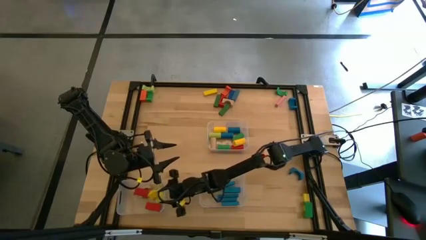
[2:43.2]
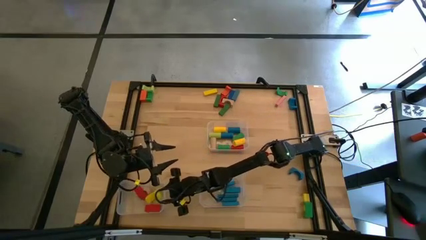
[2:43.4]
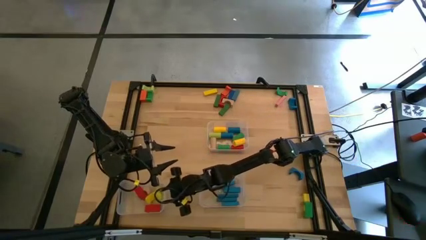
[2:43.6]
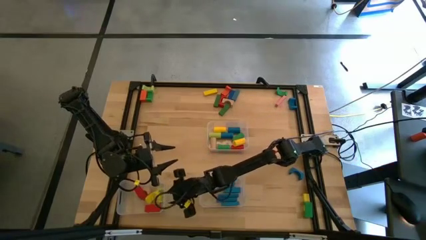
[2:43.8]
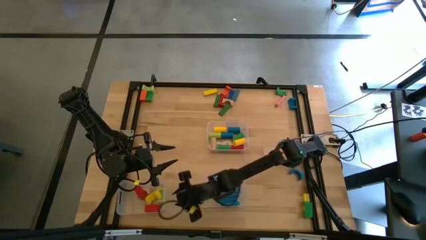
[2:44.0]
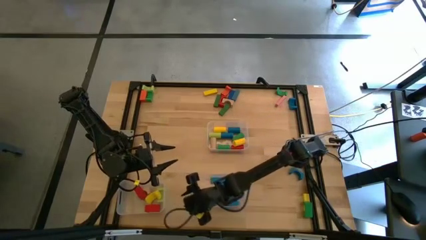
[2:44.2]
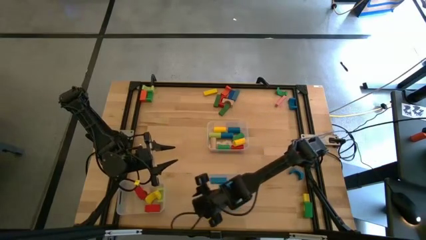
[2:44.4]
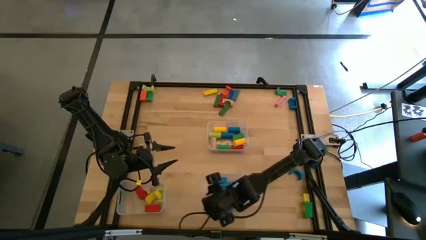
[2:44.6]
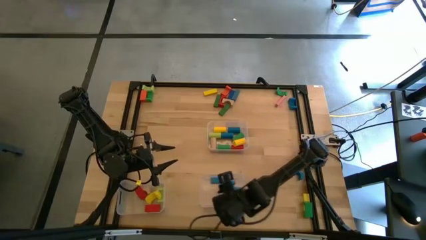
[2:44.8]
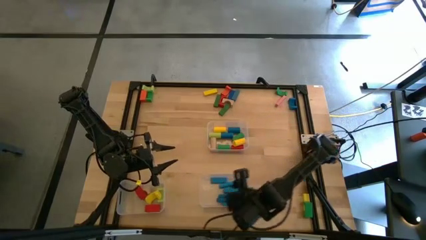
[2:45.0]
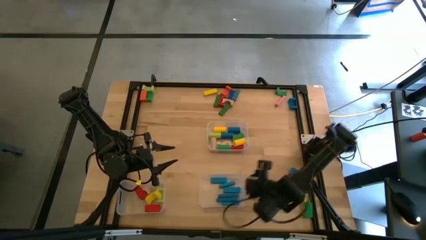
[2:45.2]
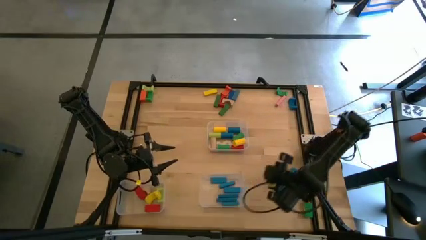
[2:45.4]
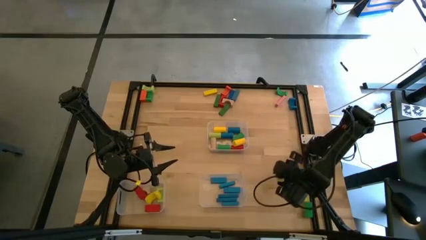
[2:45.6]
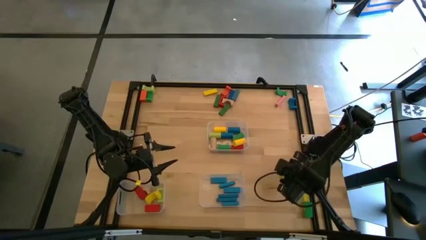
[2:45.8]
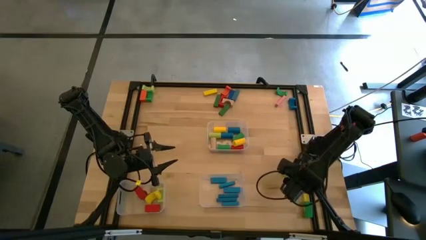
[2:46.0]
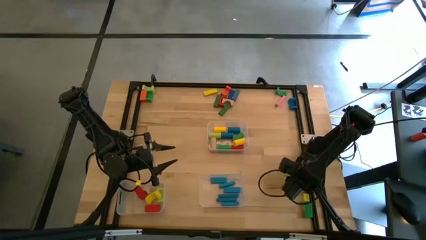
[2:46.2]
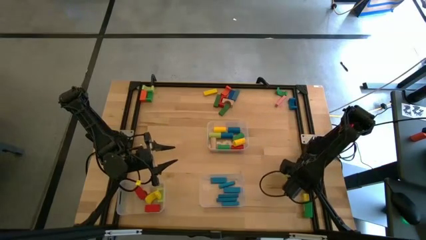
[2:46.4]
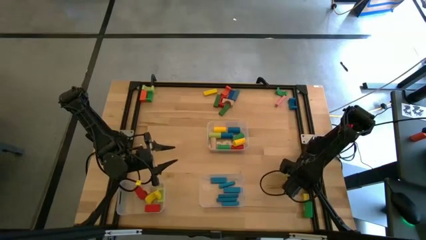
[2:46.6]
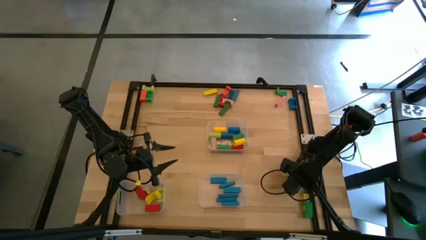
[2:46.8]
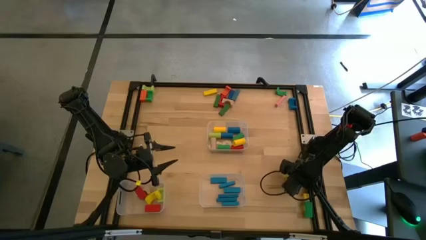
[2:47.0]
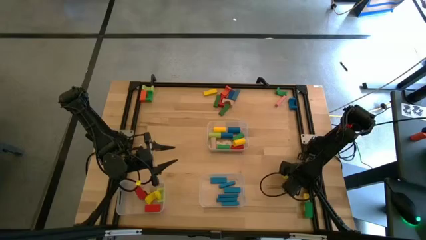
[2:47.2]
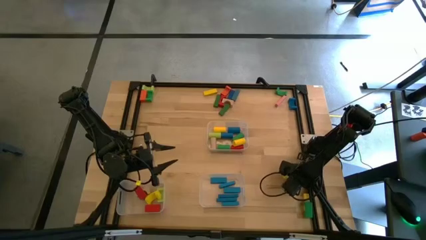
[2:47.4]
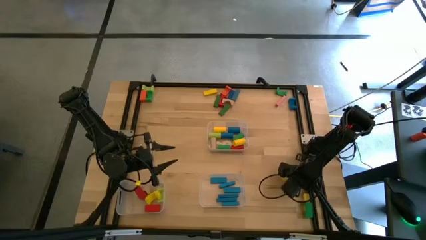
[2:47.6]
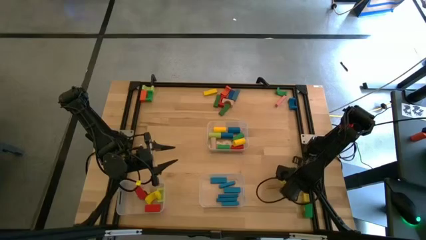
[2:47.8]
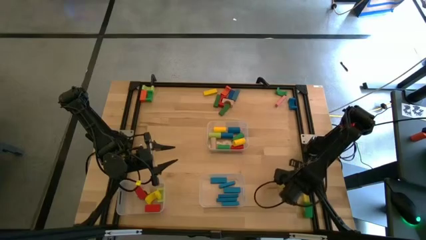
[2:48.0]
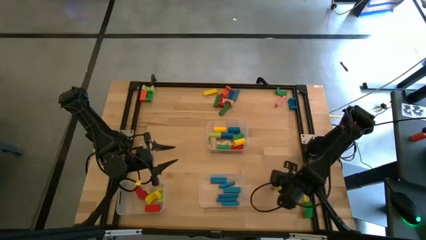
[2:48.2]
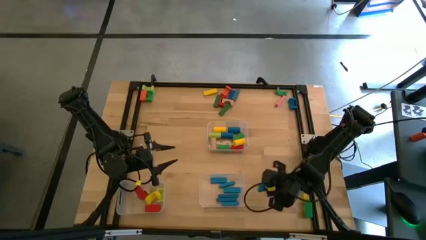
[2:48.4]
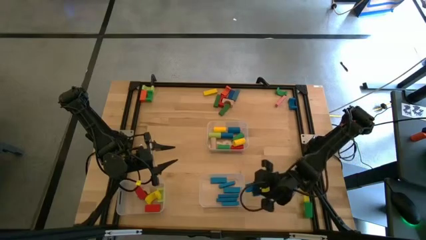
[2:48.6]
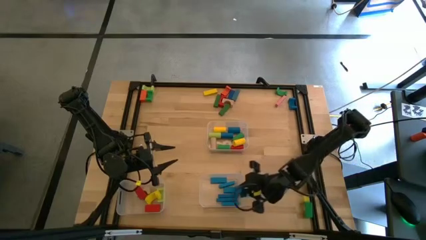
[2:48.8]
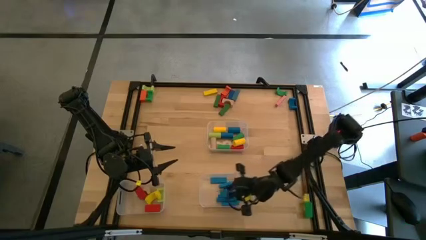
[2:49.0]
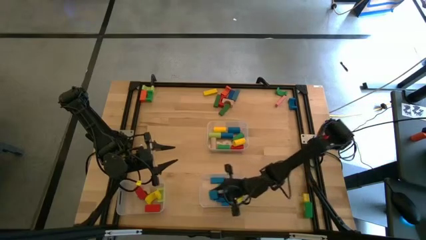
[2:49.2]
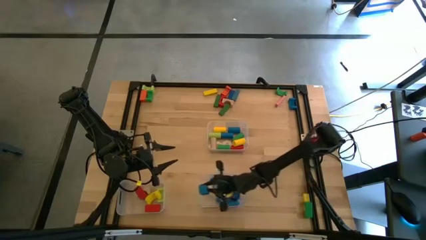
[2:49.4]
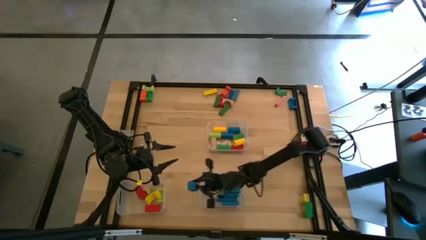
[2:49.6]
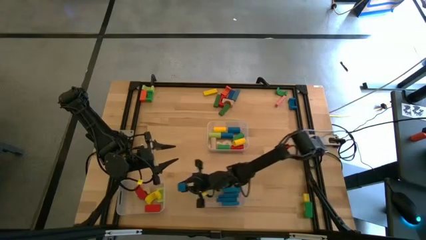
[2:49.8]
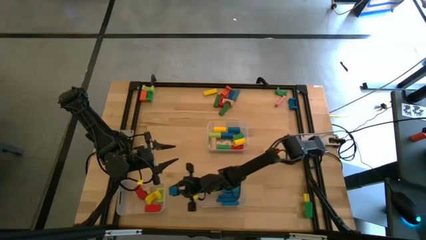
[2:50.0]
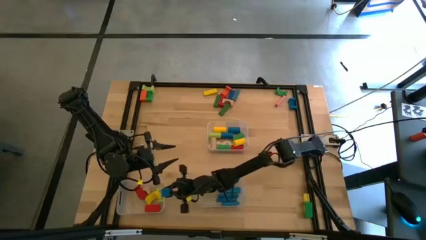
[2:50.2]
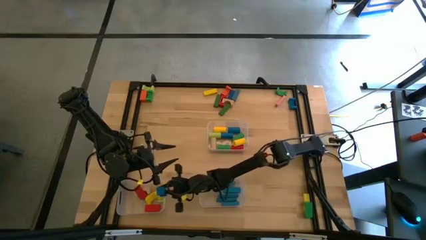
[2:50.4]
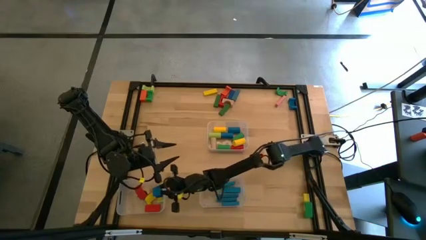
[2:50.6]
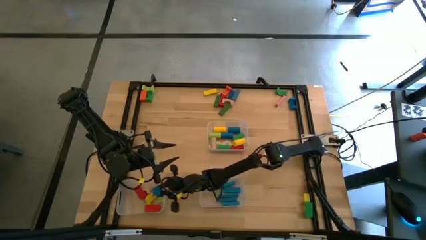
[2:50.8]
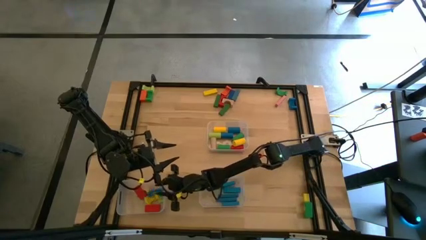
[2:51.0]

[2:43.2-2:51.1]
Task: Sort blocks by size
Put the blue arch block into the bottom left transparent bin

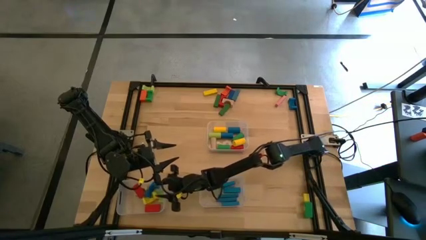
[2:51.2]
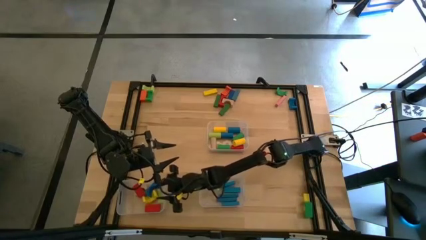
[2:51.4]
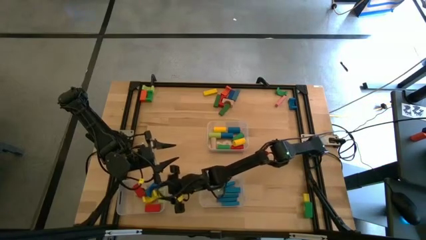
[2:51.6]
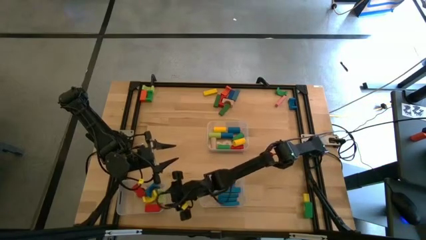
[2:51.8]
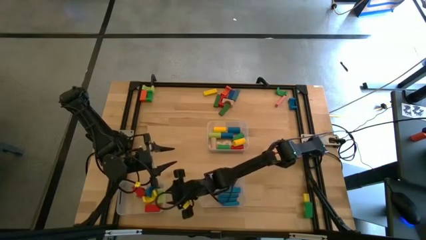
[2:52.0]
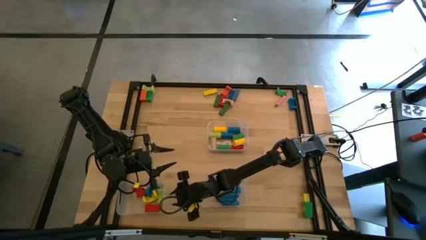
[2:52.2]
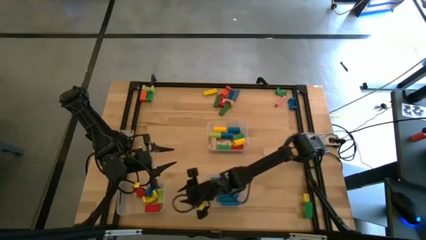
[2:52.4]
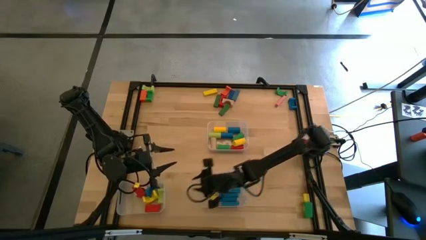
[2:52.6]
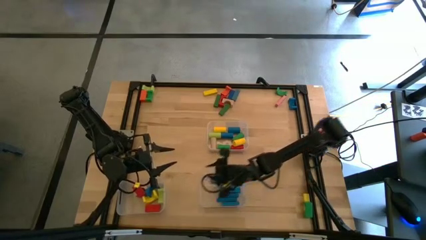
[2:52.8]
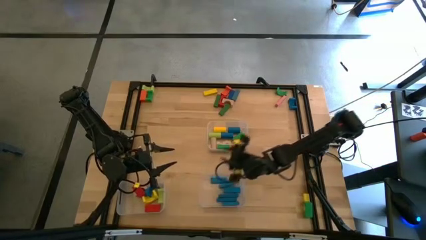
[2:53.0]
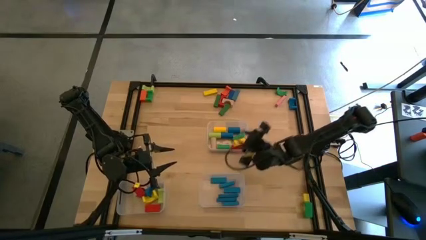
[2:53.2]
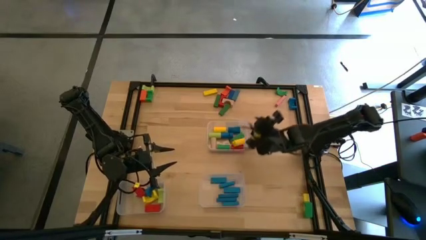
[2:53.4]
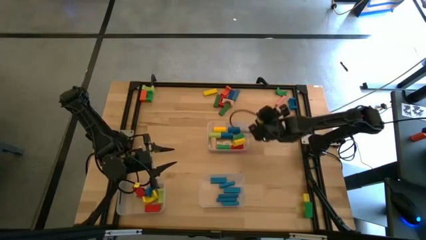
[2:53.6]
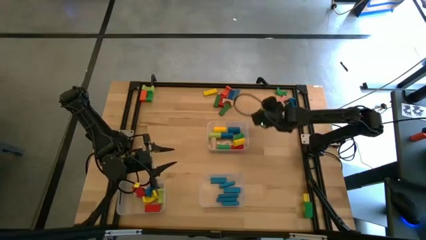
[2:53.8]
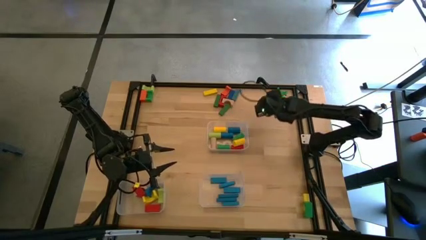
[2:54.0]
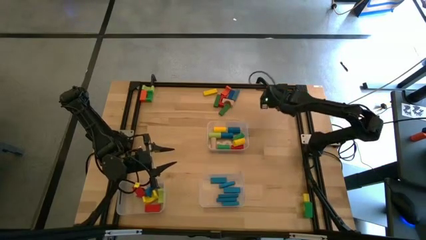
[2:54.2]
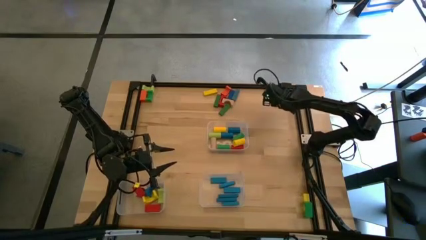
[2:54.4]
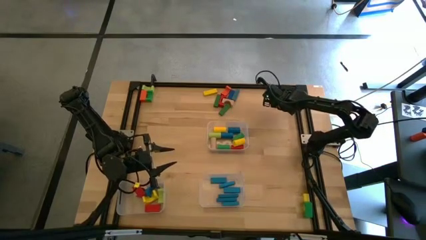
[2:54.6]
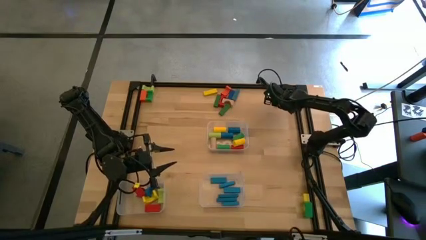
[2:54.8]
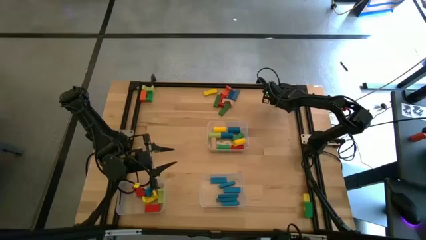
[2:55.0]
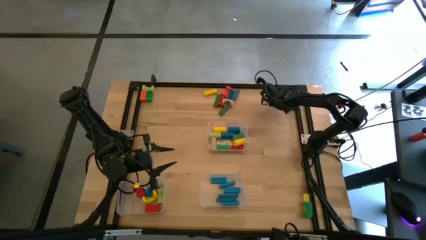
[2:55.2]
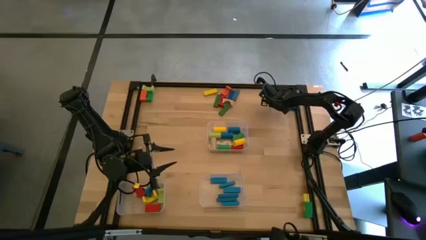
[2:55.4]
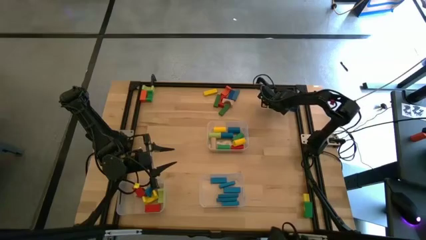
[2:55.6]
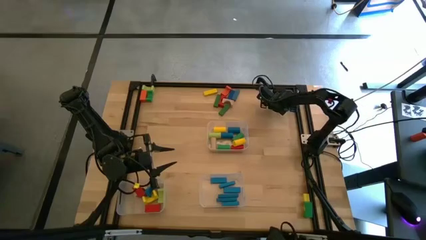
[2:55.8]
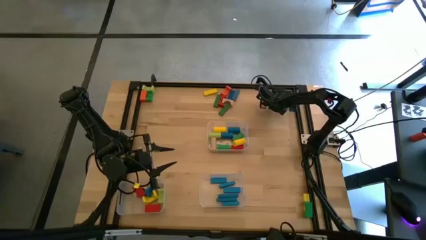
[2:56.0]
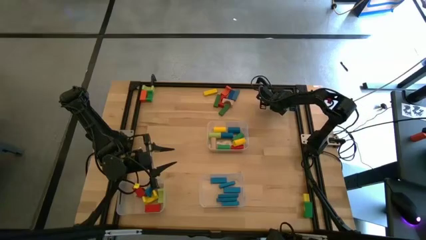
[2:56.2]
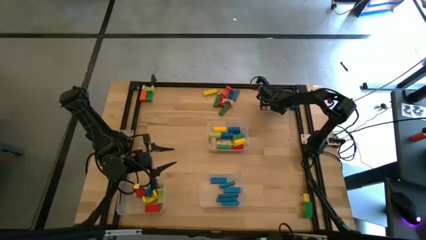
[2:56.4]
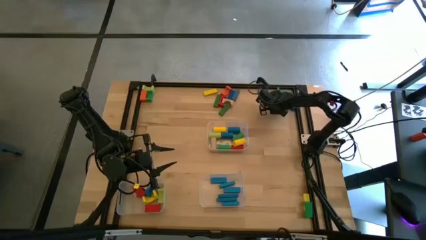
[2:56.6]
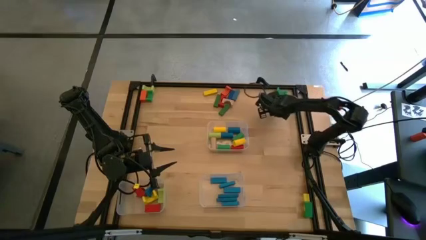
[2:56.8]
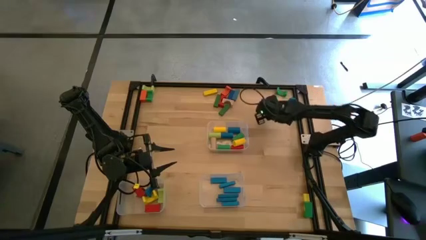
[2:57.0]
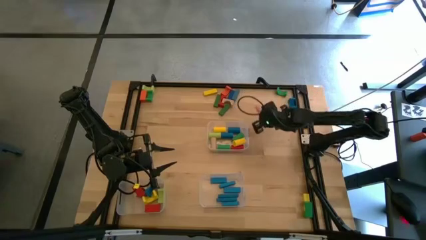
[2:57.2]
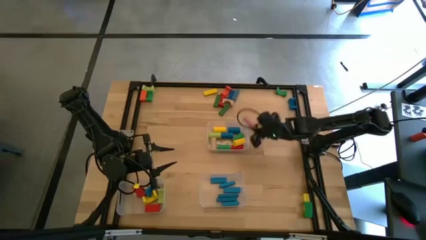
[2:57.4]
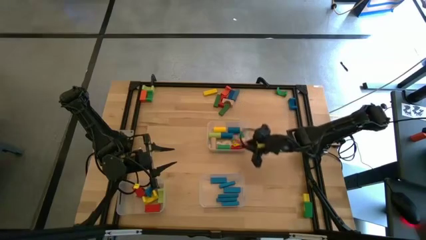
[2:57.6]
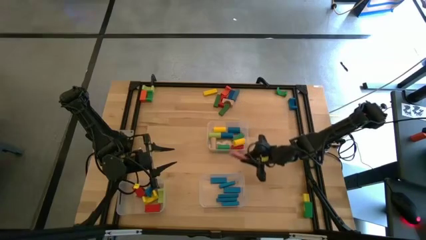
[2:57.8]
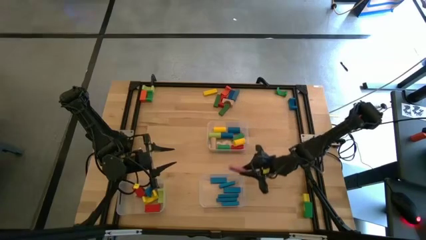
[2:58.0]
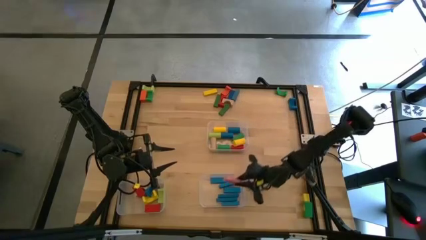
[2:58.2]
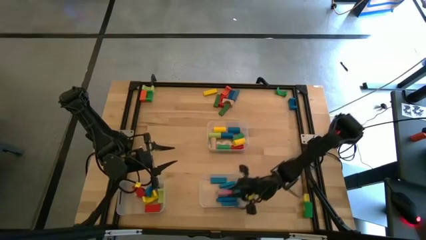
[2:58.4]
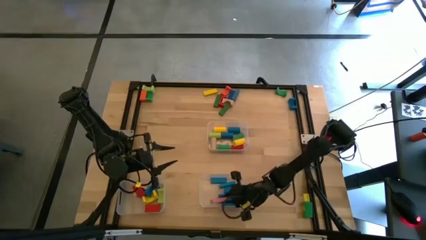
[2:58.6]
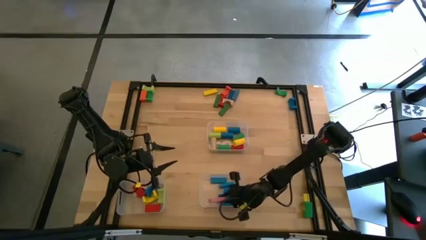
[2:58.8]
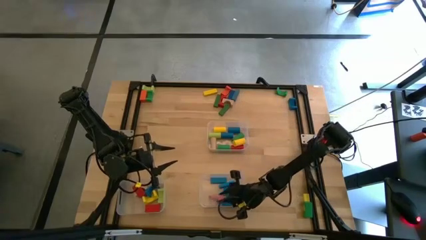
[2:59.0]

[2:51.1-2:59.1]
Put the pink rectangular block into the bottom right transparent bin
